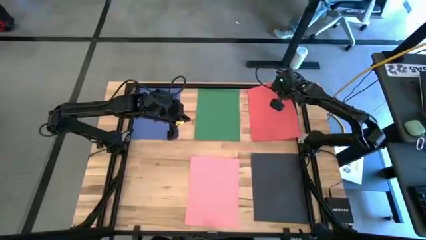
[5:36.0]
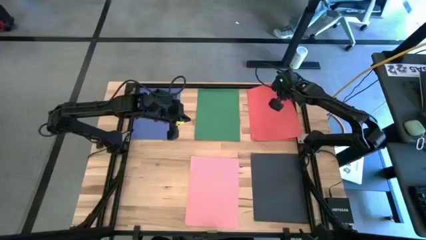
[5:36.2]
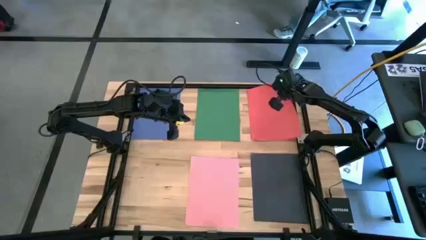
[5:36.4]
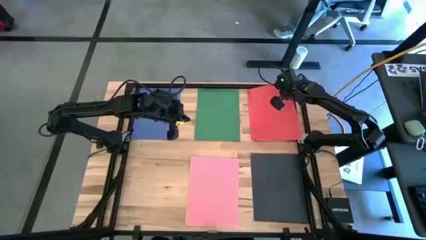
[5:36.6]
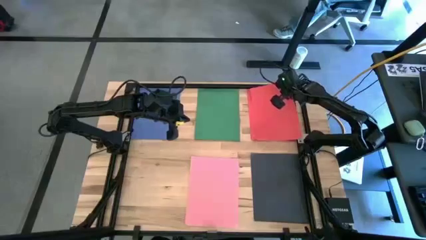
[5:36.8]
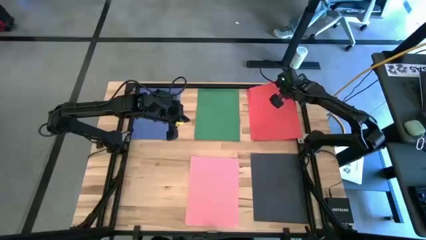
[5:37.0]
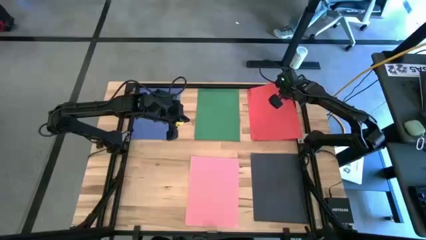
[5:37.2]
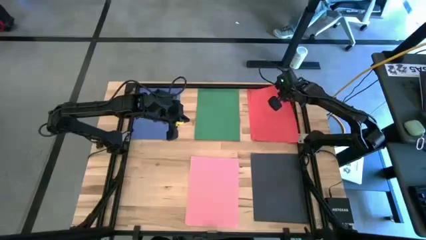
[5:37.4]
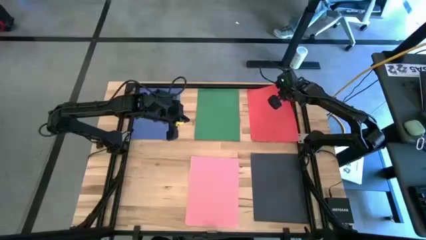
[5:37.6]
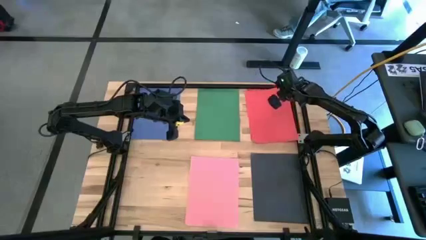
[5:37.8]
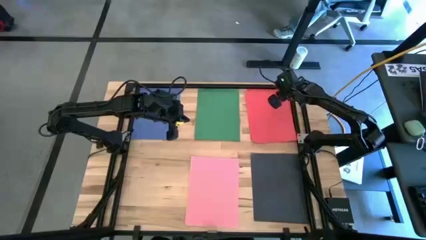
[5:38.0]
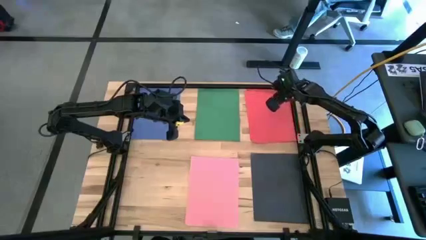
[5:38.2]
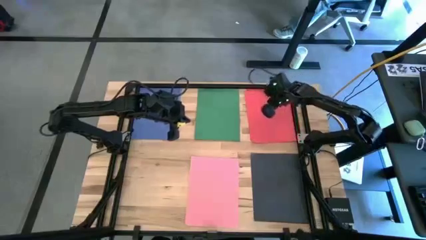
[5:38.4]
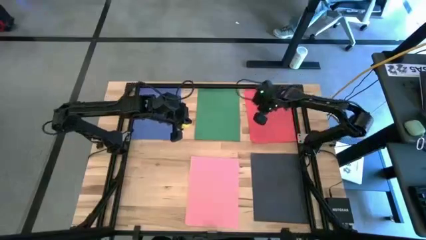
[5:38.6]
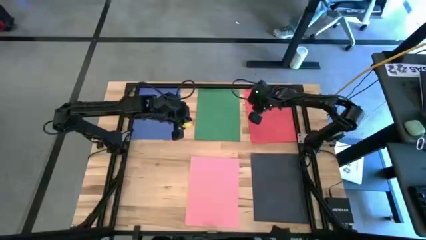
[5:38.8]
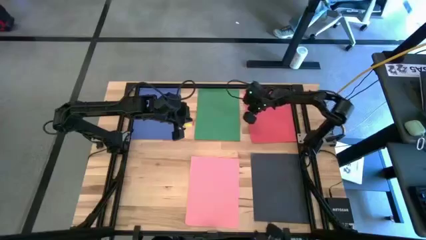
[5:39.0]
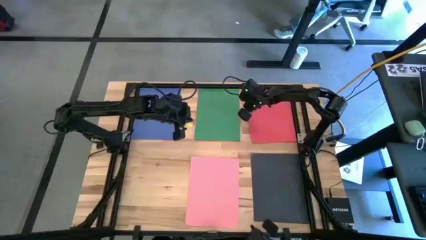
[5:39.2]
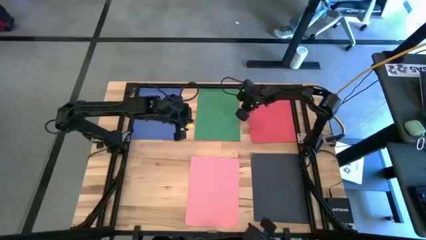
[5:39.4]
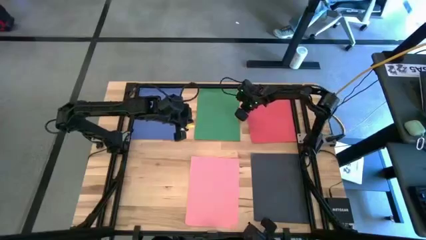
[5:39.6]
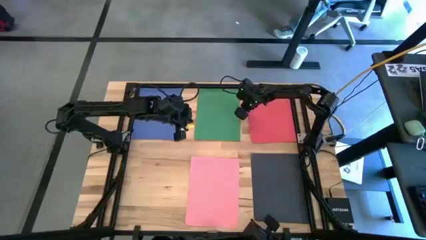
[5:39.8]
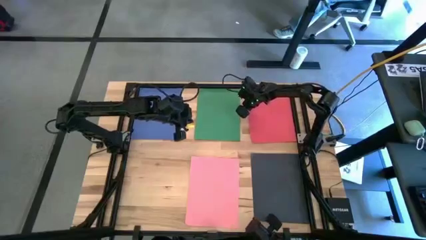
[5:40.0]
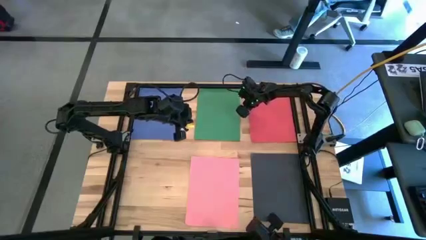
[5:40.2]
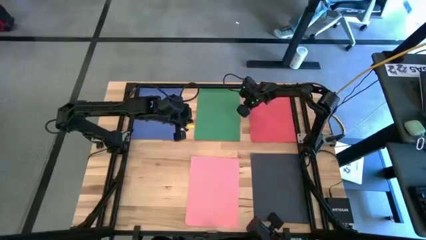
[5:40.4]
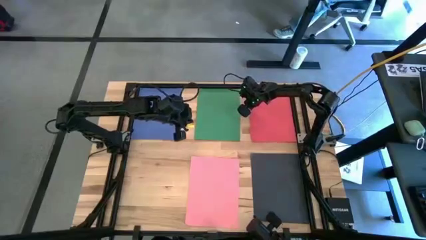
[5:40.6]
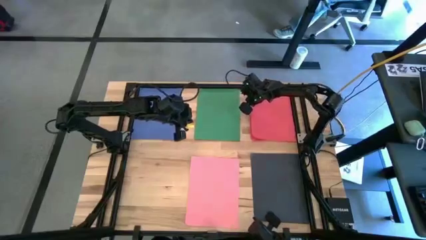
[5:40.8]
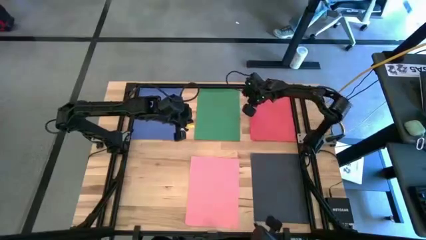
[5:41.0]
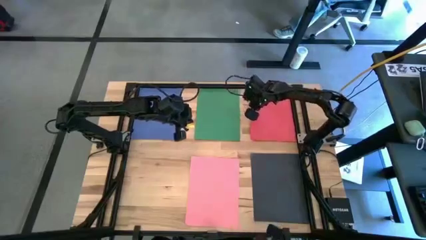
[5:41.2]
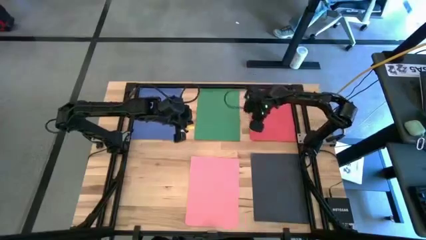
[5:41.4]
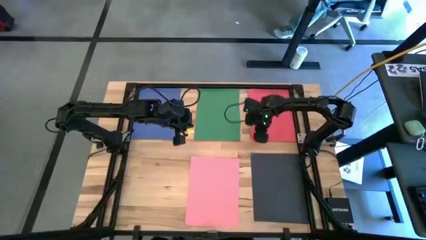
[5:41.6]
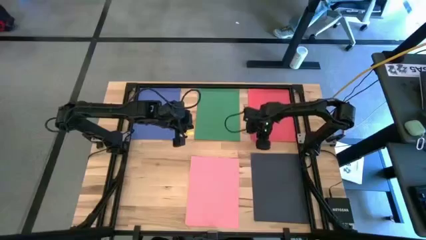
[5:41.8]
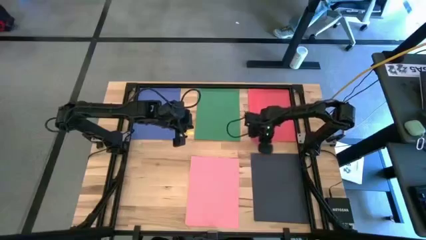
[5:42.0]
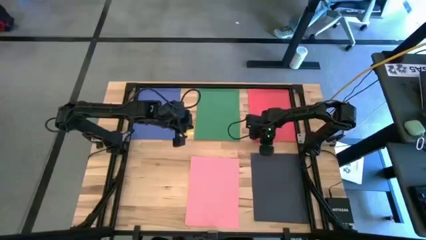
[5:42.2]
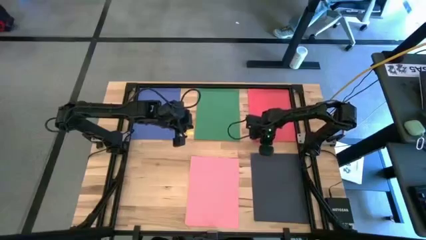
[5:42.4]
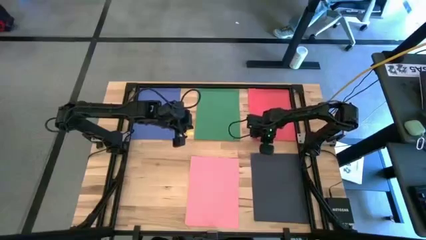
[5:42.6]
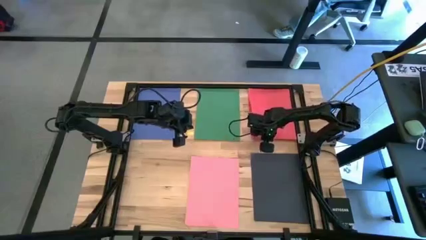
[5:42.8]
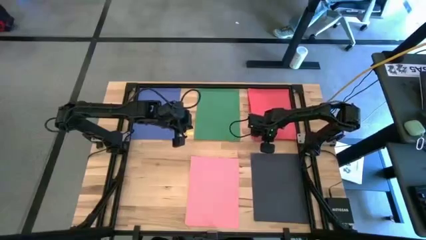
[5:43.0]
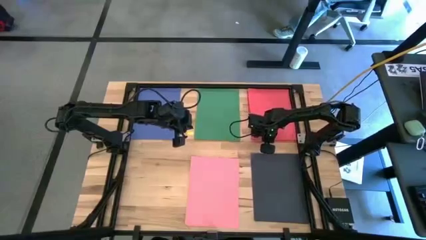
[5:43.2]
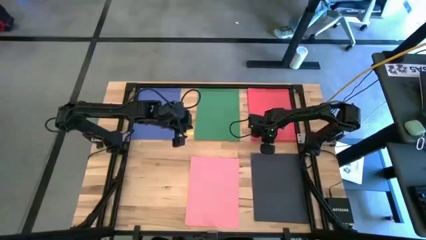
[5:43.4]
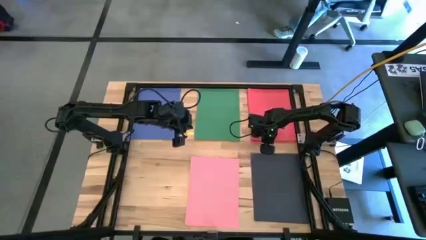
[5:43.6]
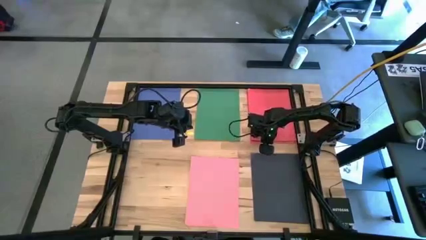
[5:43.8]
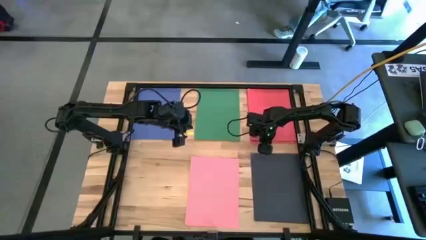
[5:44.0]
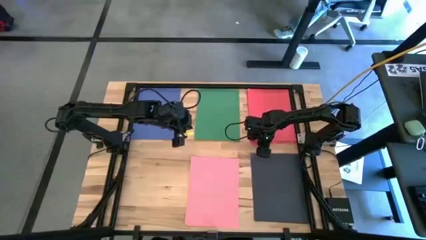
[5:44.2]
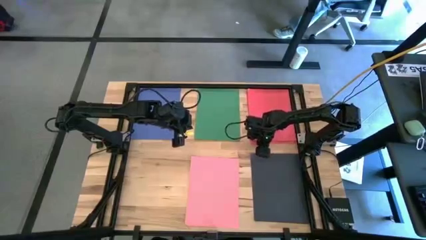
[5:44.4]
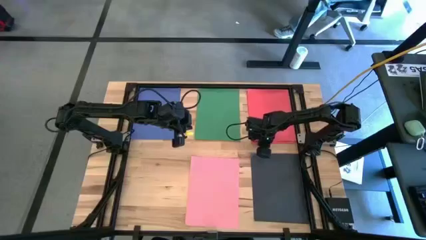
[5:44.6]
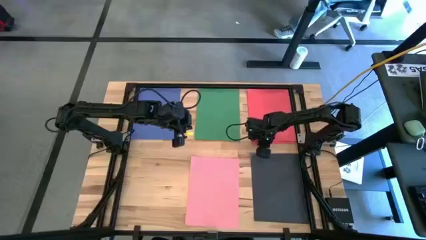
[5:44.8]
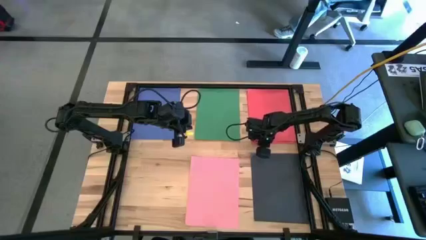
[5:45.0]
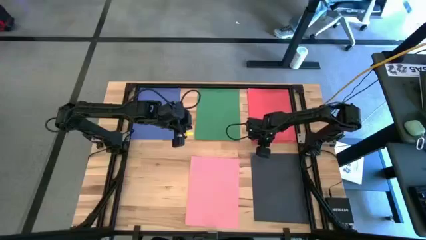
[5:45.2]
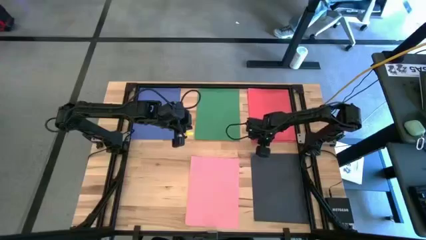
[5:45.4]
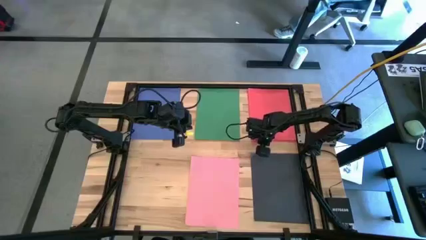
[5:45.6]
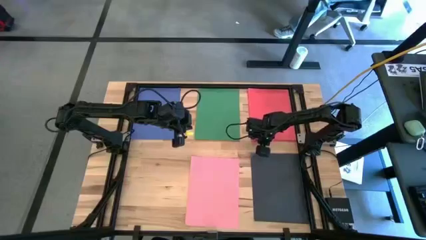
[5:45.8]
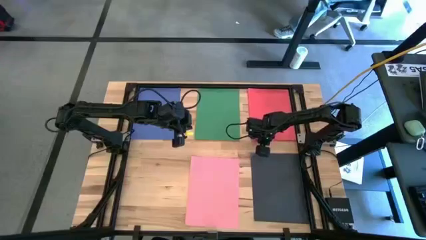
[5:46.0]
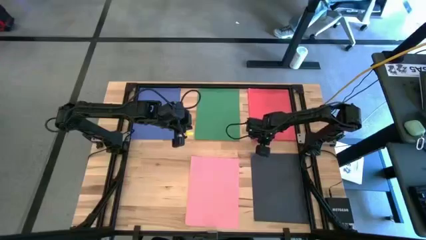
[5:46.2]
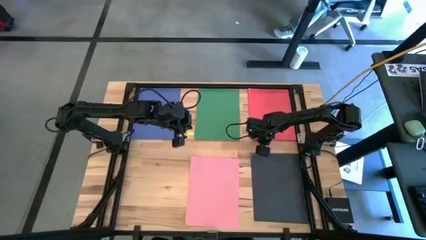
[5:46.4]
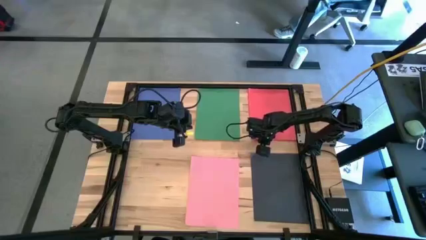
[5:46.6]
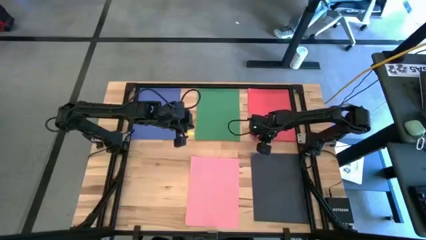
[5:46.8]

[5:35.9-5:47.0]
Task: Organize paper
Stack the red paper on top of the other red paper

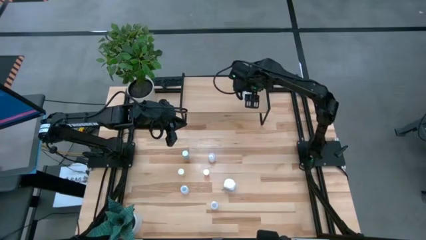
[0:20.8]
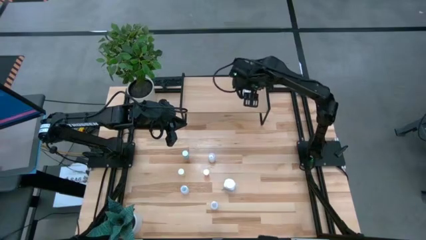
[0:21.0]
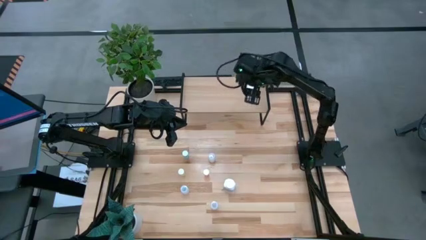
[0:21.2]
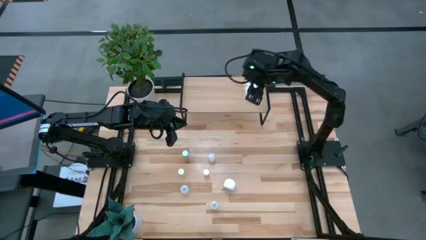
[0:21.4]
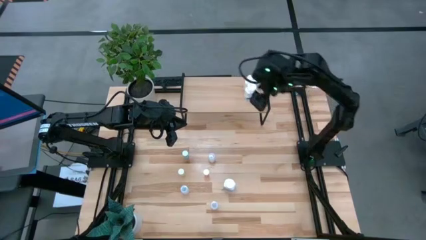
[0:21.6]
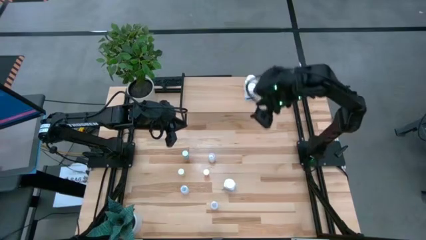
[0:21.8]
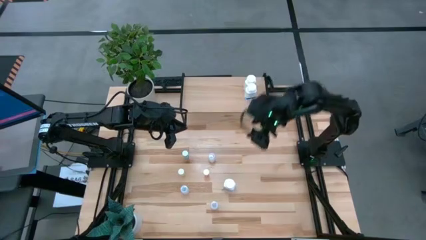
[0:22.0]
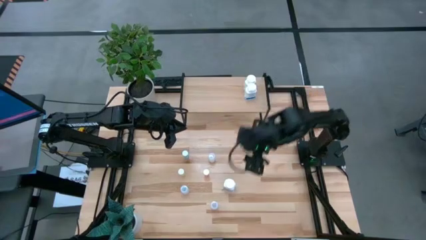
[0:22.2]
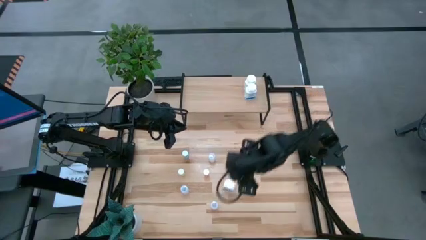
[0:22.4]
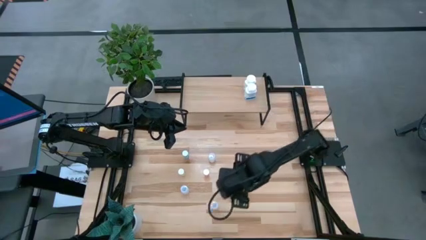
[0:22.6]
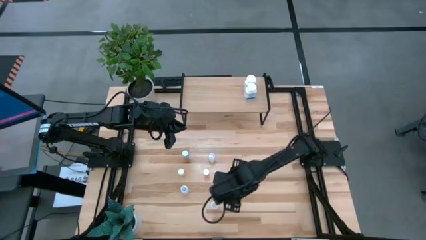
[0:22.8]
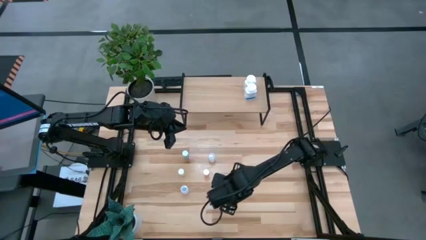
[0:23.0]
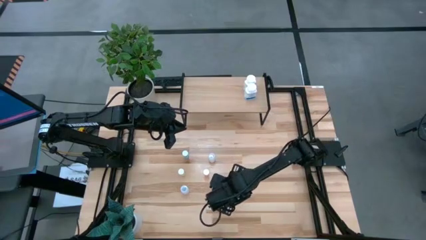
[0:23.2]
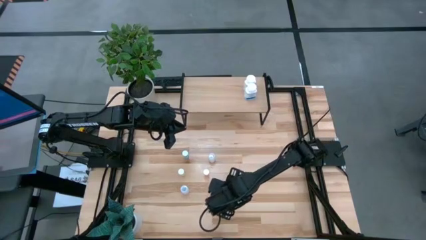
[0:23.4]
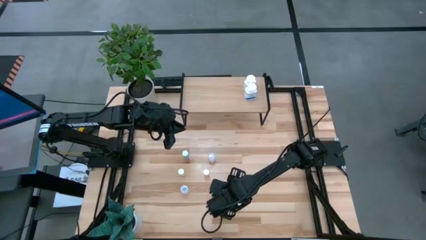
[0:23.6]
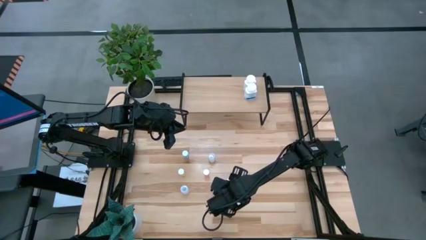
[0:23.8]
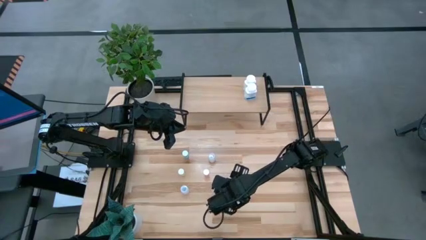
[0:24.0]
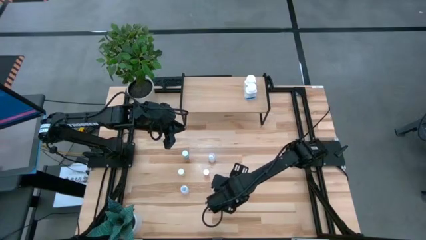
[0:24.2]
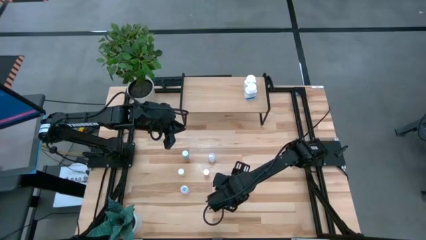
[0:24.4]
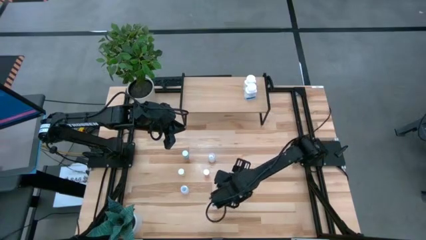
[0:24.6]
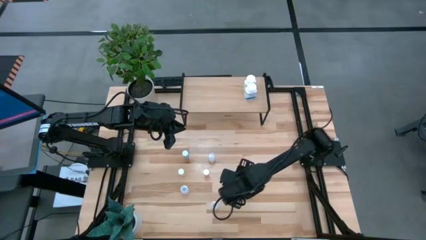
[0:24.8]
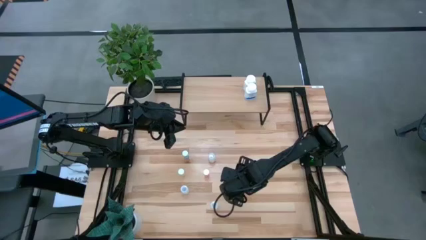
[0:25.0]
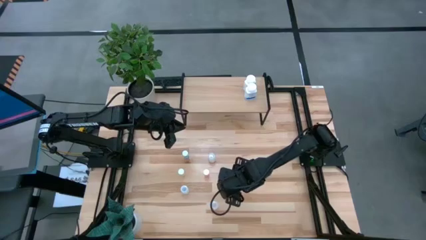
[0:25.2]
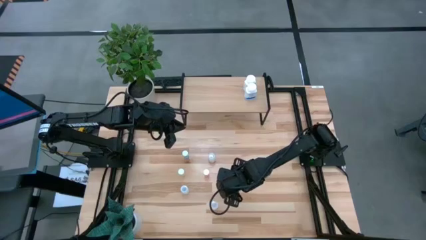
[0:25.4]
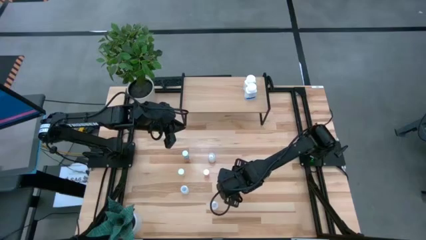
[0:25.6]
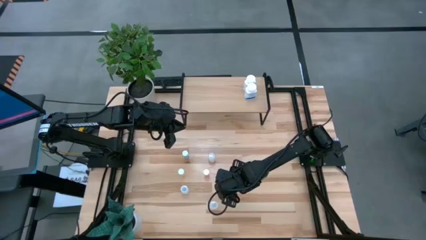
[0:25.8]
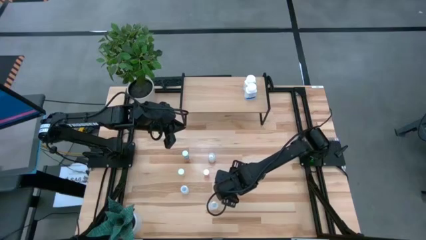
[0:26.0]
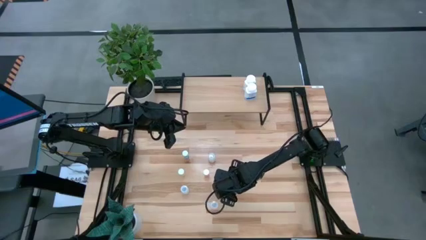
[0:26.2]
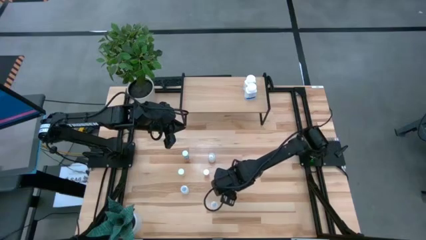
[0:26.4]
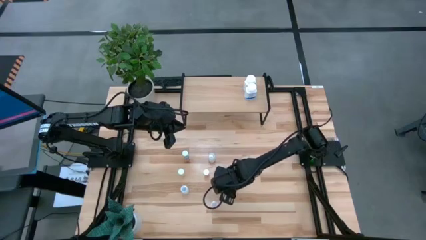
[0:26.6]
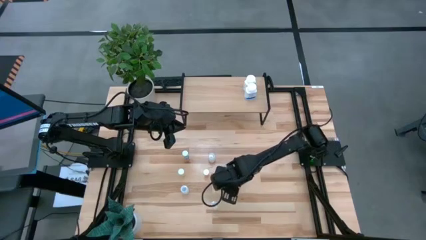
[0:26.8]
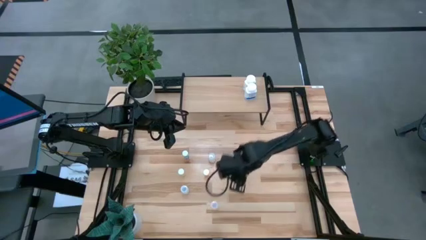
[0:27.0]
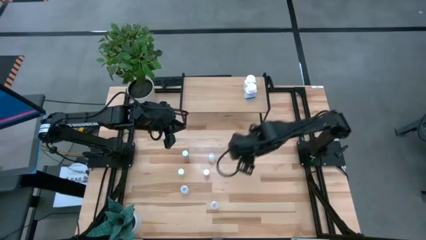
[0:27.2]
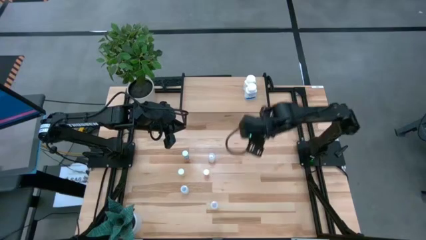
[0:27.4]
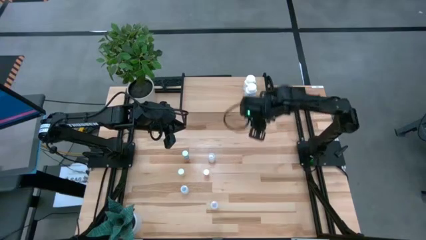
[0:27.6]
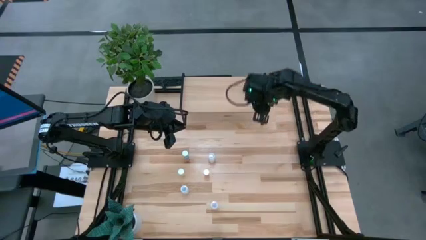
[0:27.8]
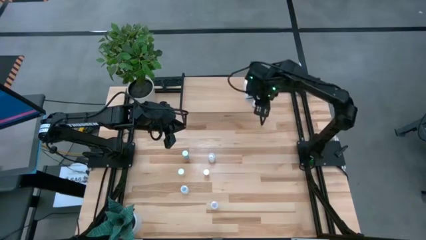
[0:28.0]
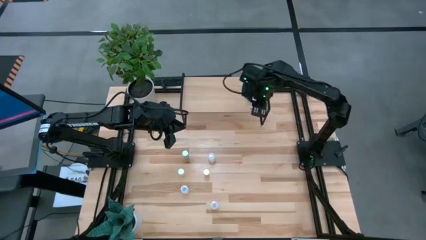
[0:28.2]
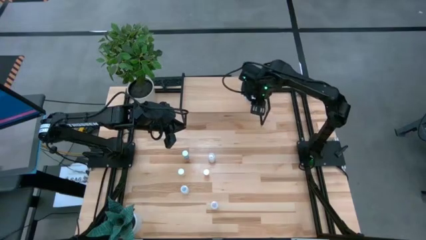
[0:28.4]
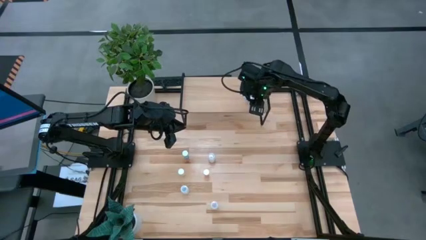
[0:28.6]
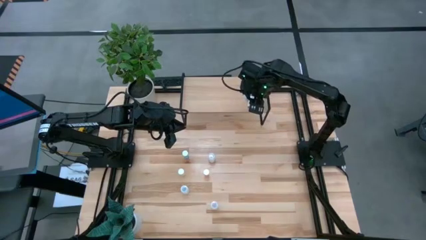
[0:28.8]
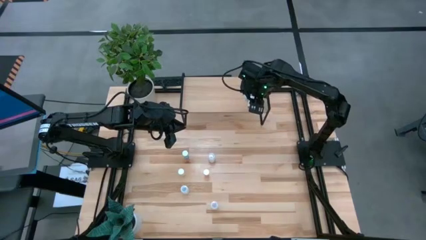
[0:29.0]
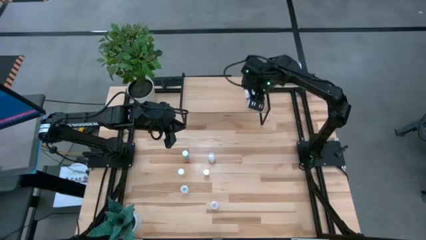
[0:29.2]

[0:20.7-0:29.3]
Task: Pick and place medicine bottles onto shelf by color
Put the right white, blue pill bottle on the shelf aligned with the other white, blue pill bottles
